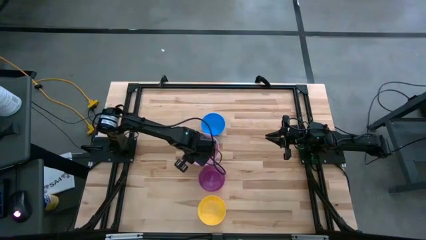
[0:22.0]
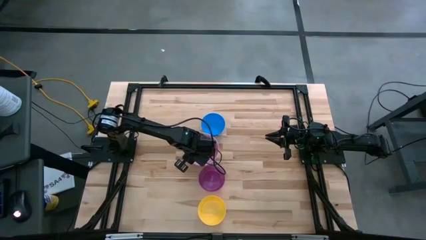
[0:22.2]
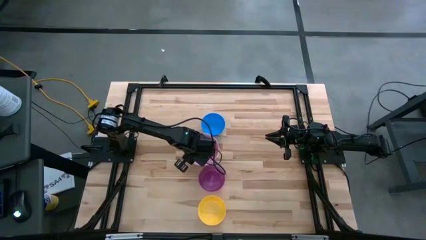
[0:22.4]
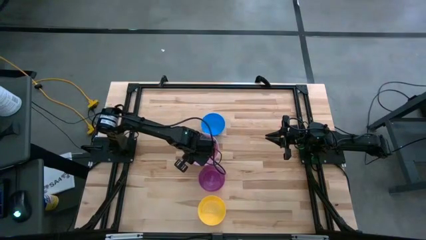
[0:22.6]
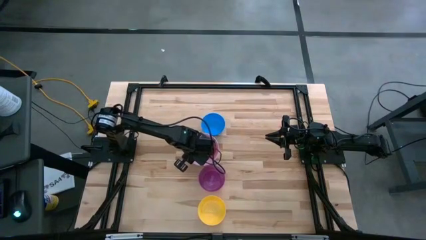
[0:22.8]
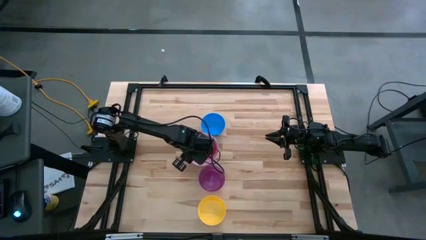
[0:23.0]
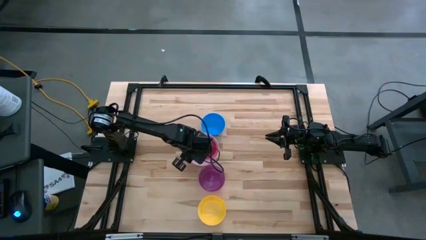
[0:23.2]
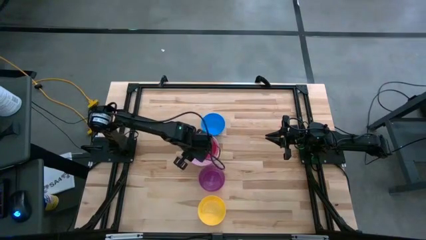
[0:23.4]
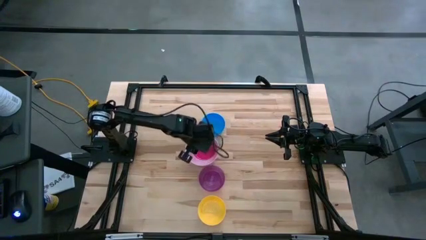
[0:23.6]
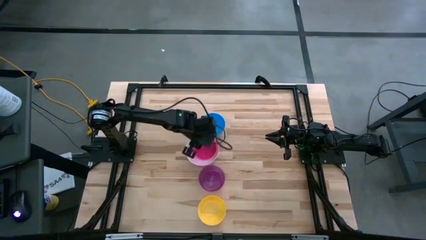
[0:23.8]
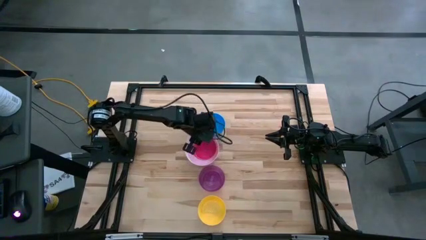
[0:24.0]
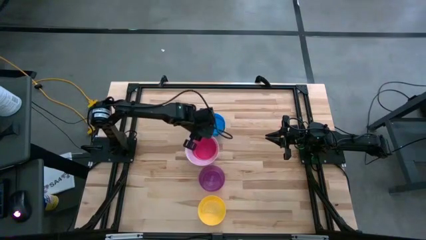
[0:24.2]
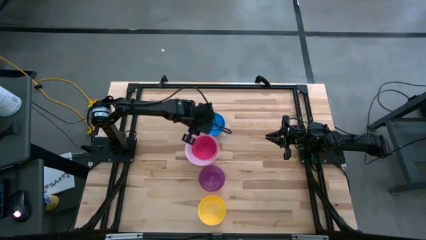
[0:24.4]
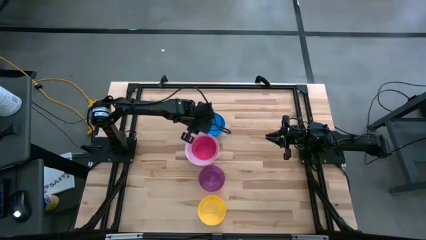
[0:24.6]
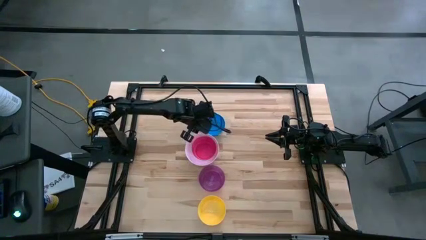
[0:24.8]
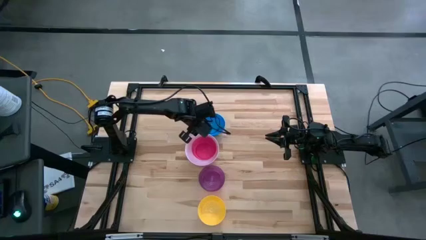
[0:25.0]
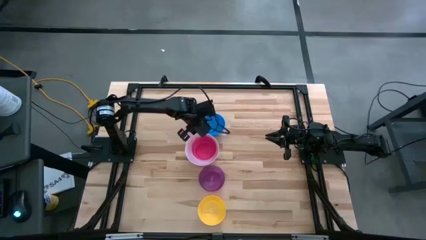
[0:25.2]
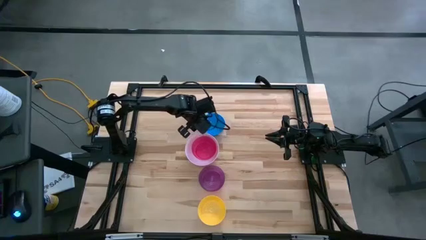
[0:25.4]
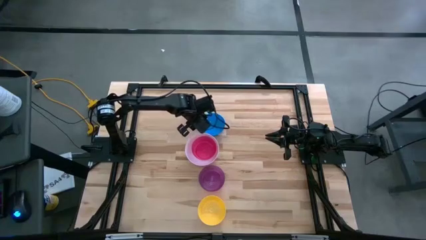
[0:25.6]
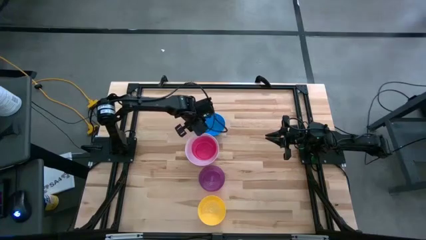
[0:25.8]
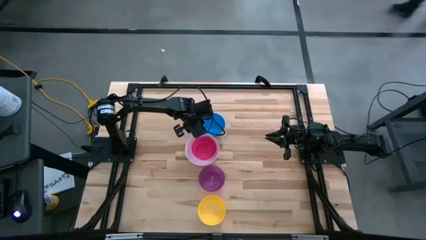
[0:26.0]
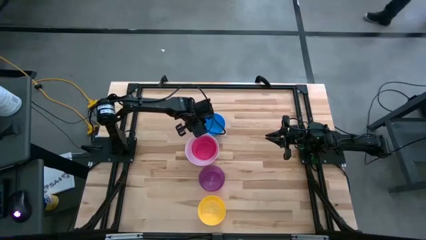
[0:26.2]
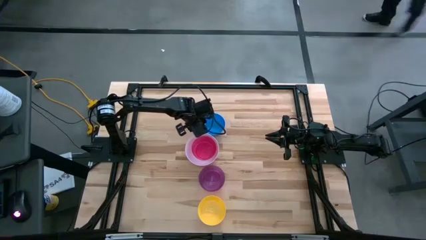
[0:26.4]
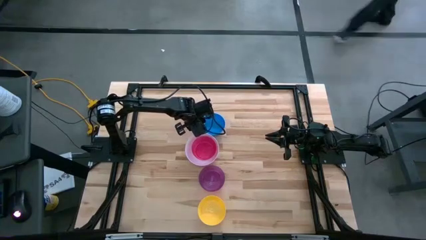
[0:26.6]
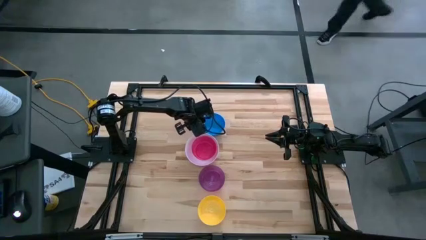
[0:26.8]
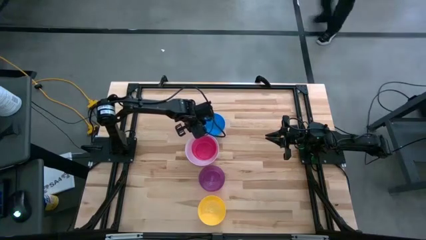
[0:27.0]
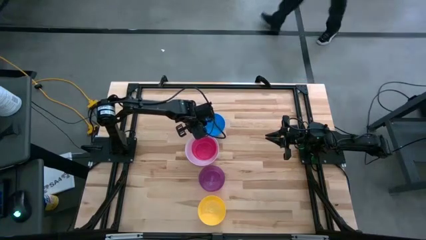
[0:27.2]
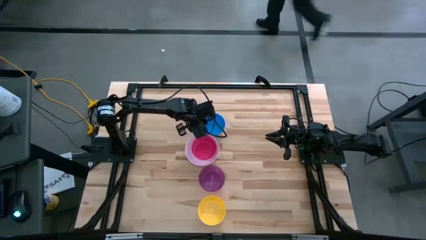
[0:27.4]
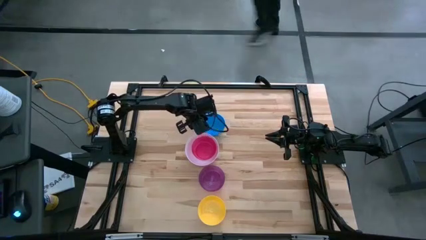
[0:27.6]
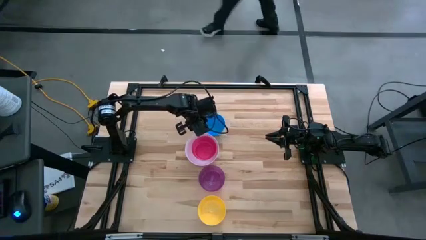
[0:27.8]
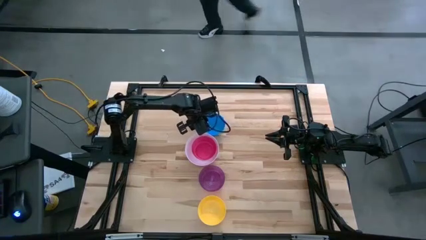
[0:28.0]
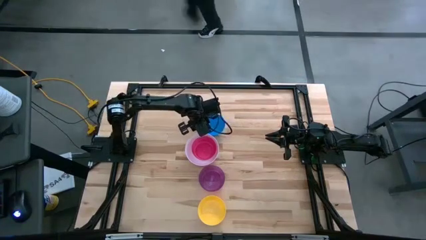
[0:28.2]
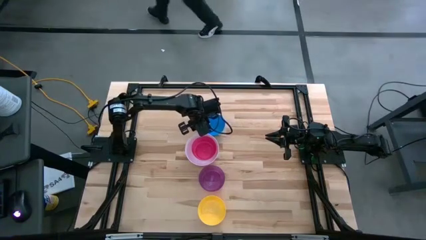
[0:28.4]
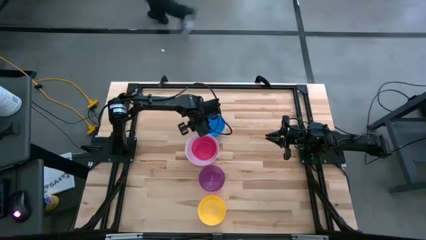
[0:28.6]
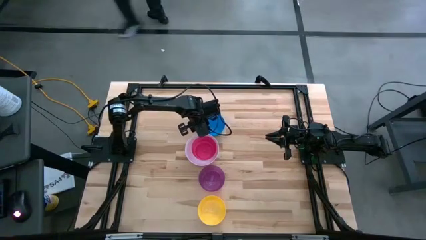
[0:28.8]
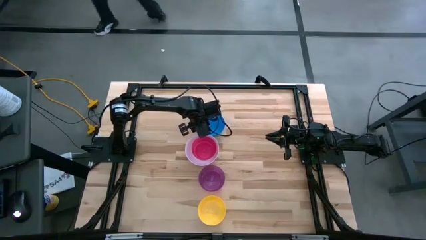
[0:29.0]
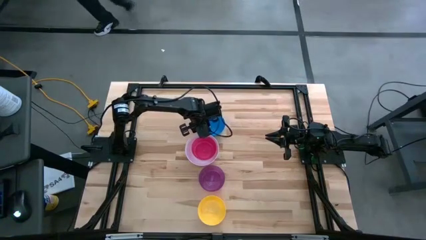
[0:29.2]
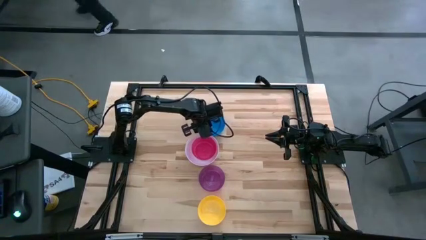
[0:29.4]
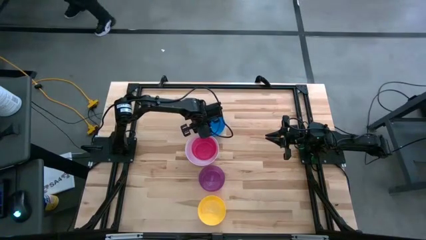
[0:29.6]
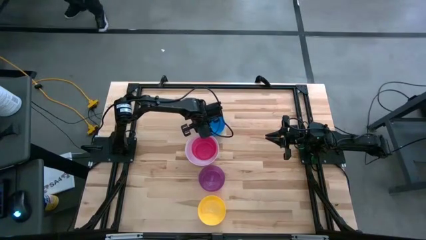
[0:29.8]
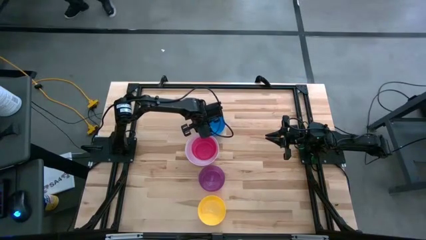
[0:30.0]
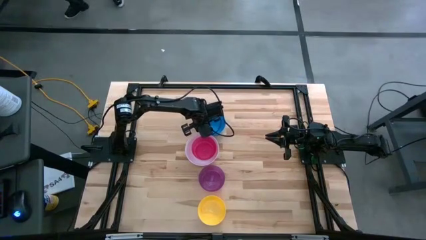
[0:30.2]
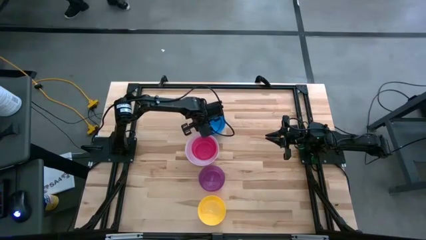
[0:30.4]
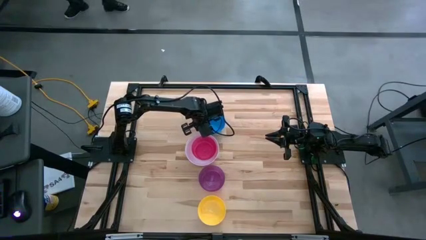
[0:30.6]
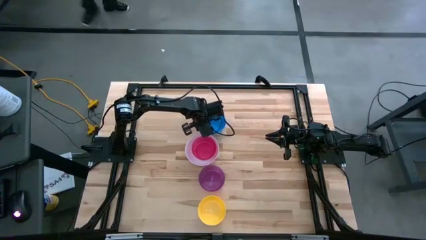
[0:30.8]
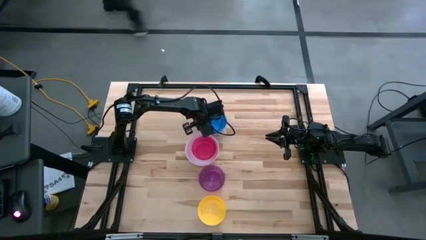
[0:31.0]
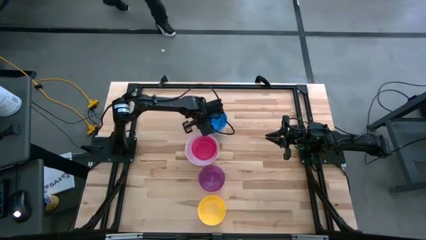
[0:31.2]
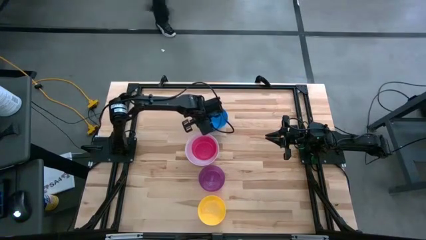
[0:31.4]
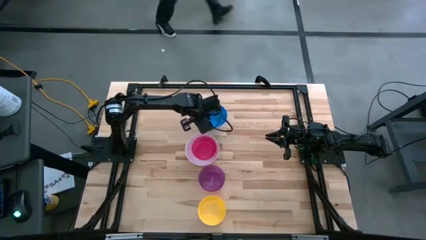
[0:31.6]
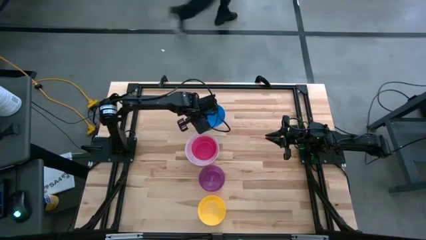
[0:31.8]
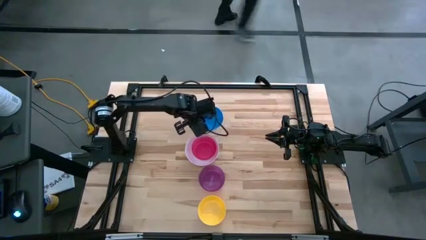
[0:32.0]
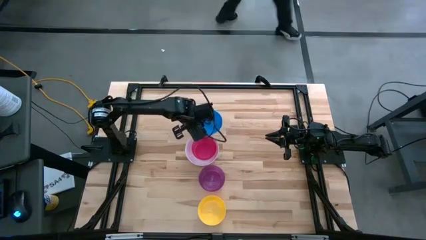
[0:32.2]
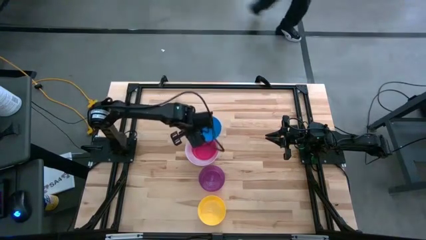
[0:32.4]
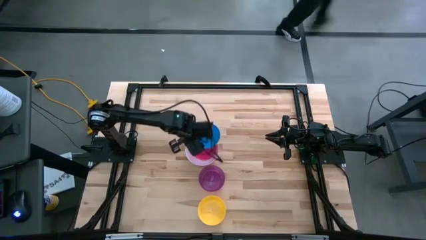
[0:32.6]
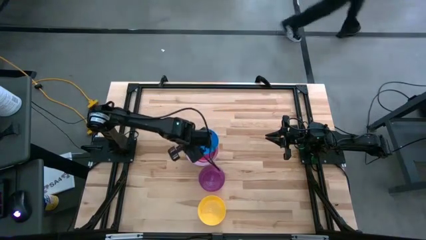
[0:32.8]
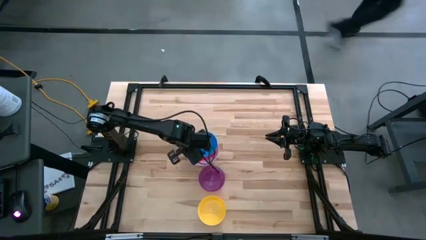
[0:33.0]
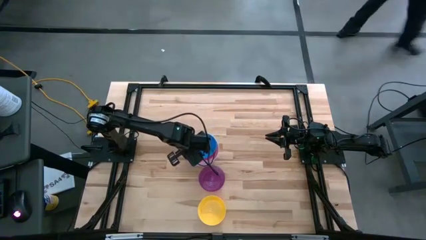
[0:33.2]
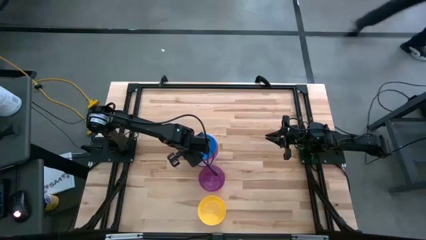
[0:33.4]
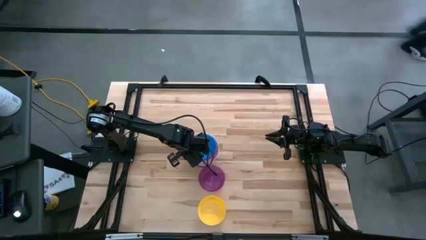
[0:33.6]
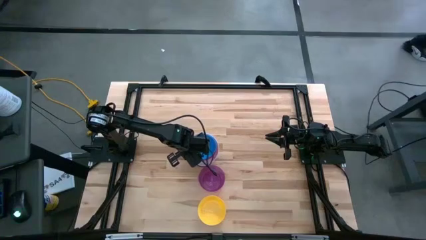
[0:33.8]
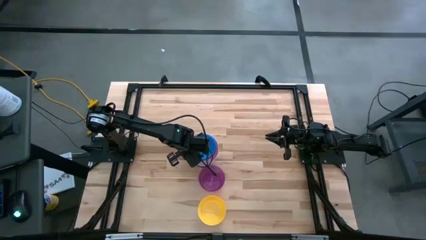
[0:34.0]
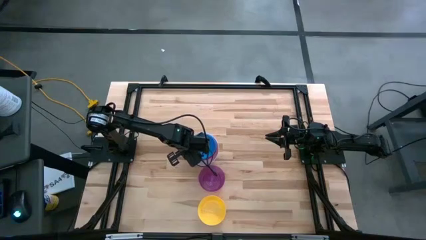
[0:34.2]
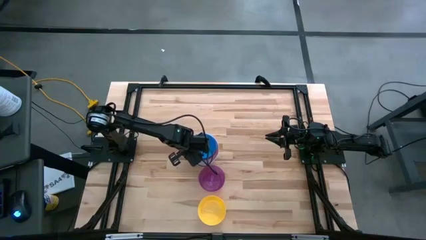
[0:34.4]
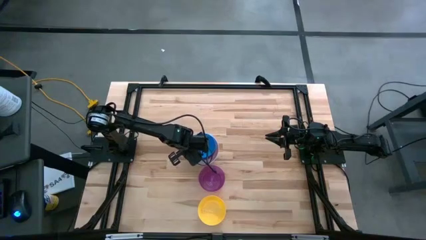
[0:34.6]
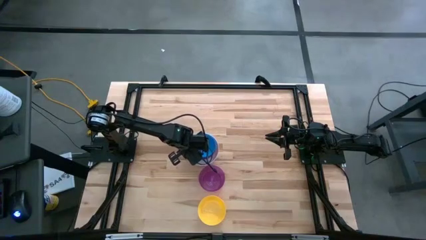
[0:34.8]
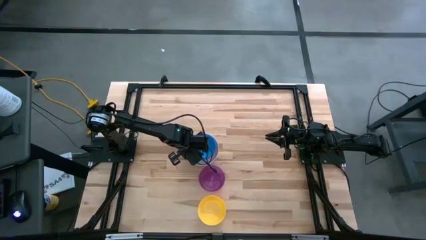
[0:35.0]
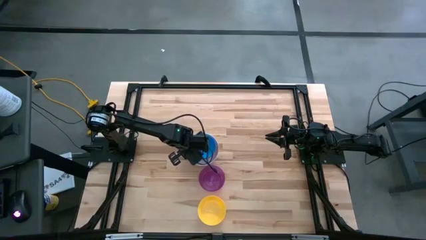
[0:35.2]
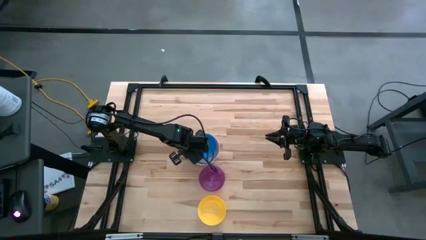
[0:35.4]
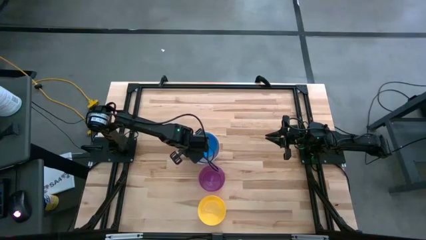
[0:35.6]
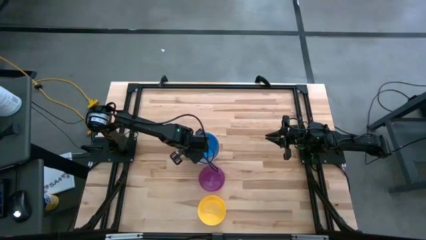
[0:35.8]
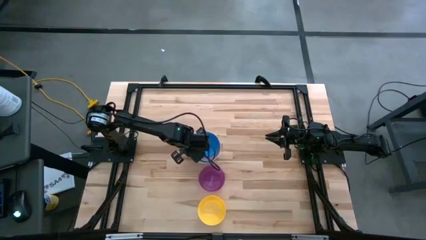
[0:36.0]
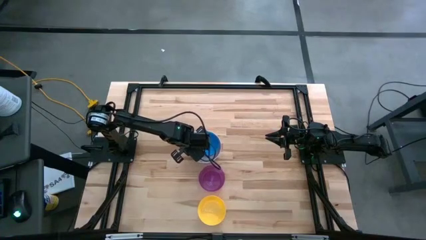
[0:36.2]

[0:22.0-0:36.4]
Stack the blue bowl on the red bowl
